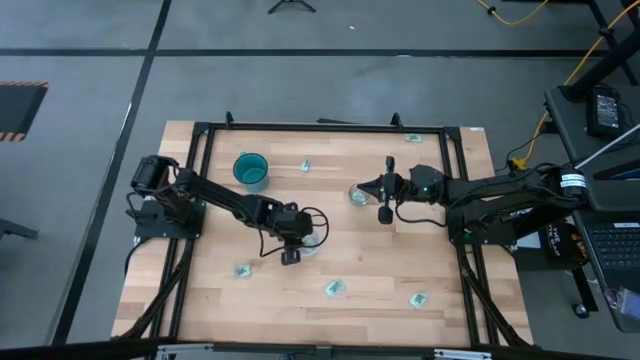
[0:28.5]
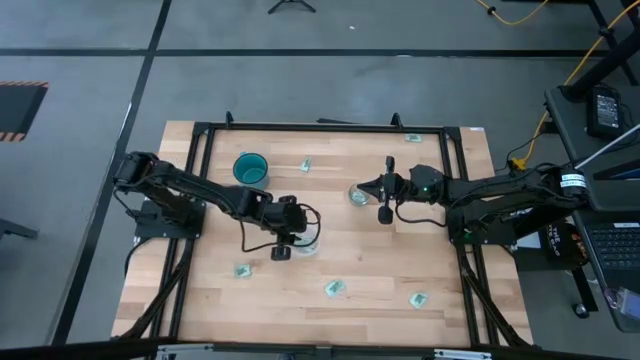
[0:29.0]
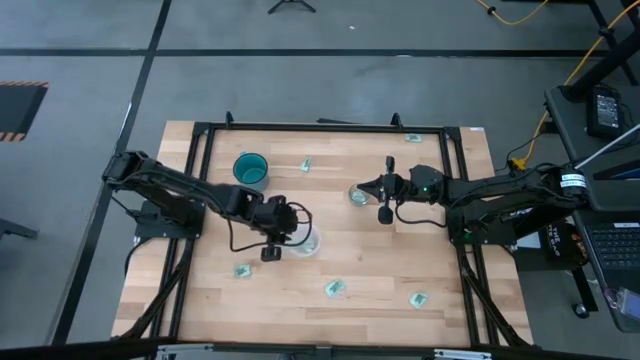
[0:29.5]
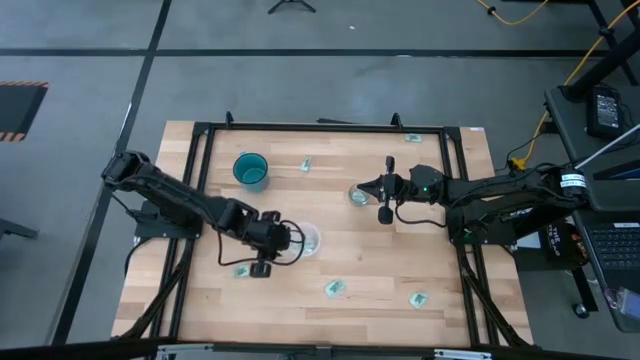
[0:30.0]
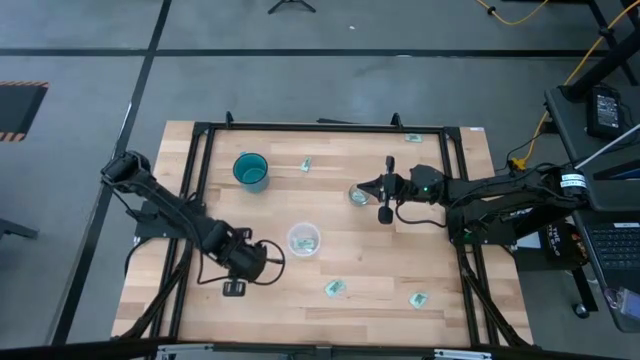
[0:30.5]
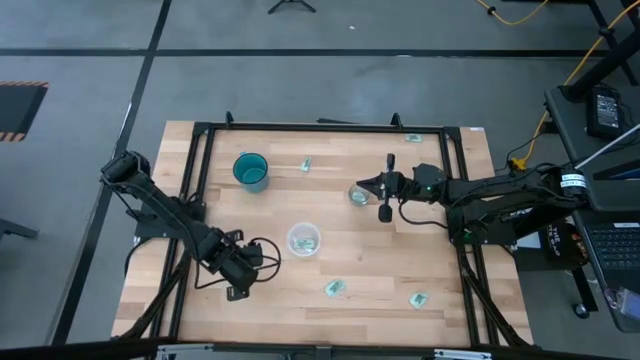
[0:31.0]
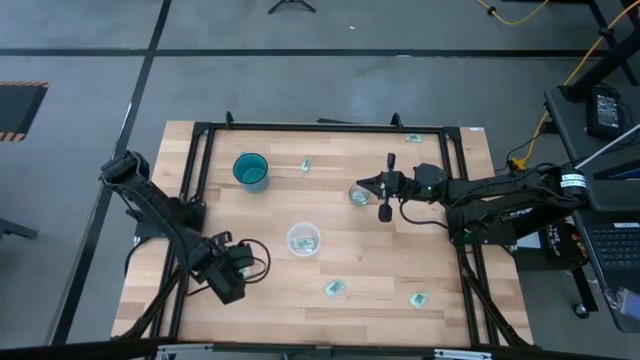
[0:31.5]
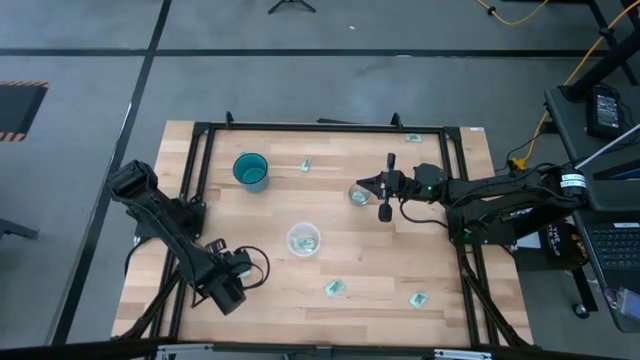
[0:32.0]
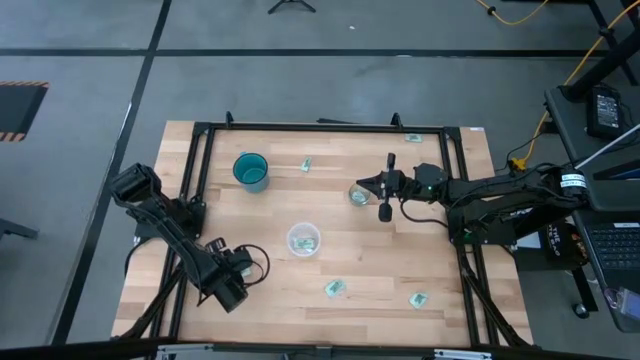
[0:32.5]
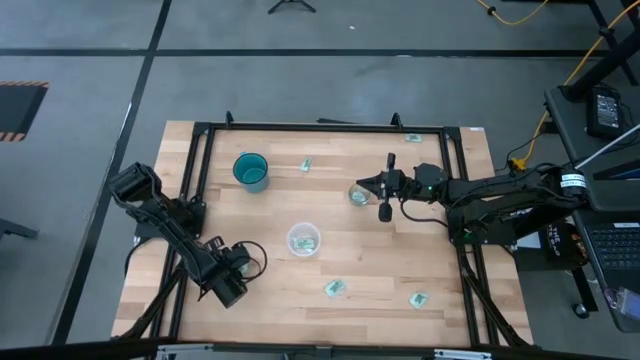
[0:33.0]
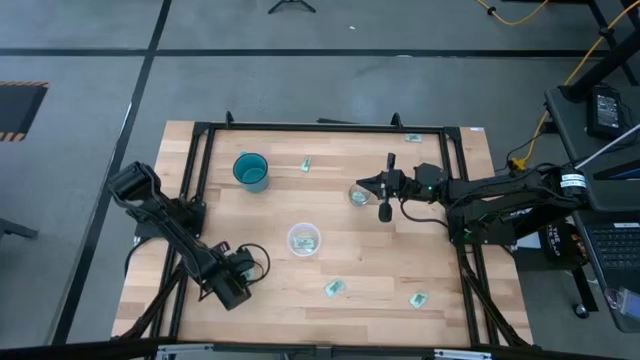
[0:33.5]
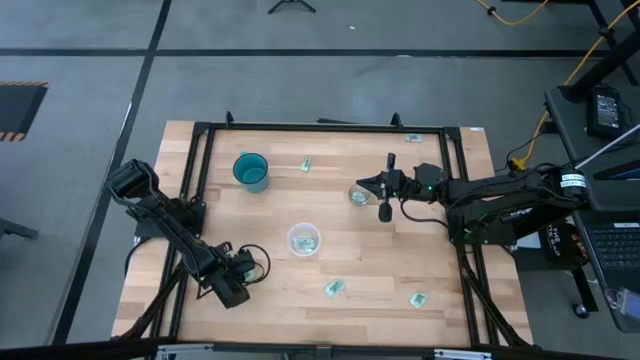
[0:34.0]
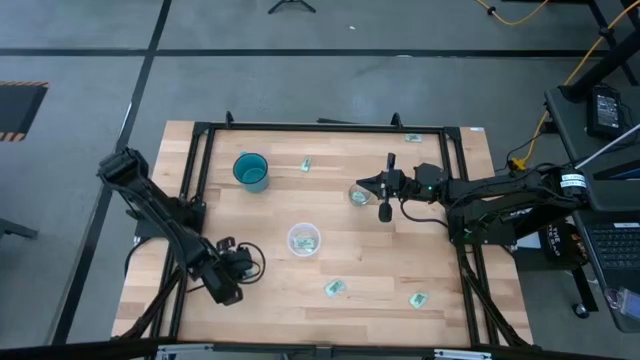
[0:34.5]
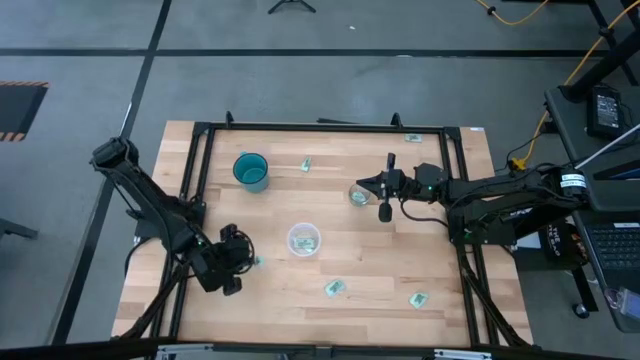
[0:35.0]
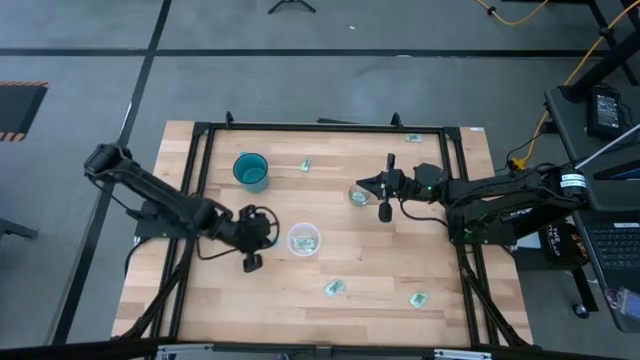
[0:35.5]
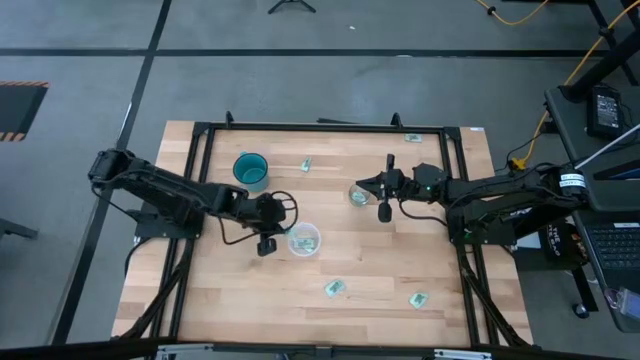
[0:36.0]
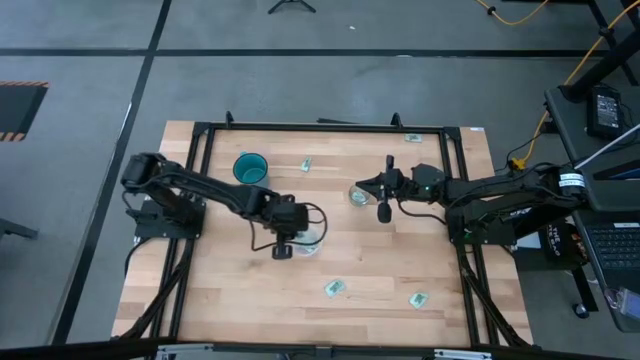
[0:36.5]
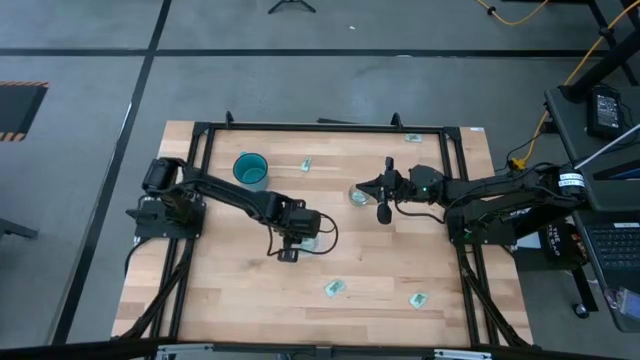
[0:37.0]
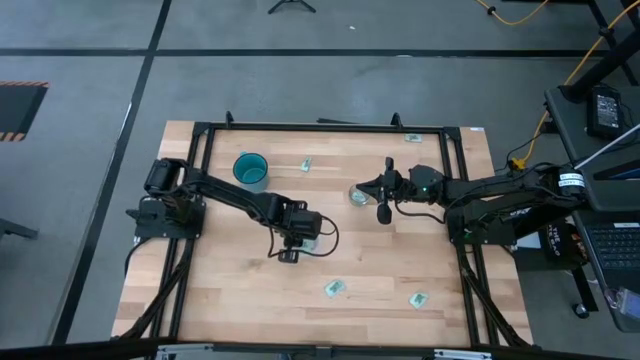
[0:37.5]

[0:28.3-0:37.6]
Task: Pick and place Stevia / Truvia into bins
Put the white stevia packet into the transparent plastic container

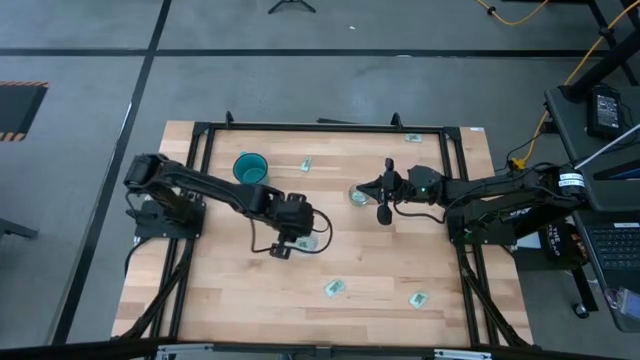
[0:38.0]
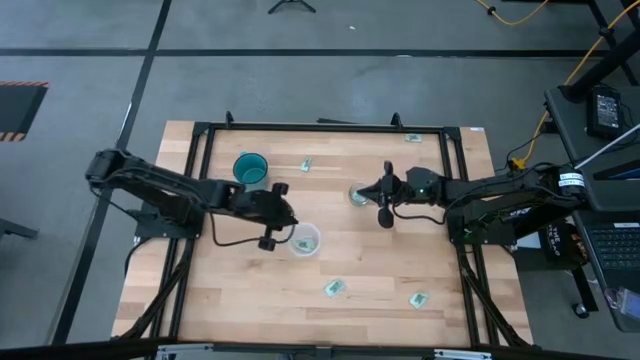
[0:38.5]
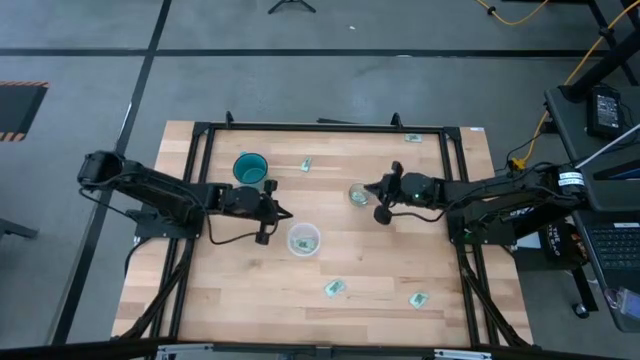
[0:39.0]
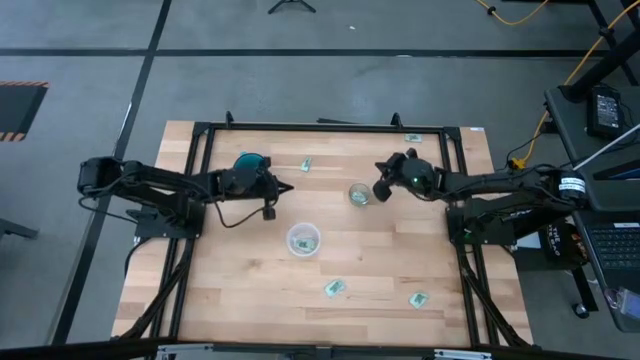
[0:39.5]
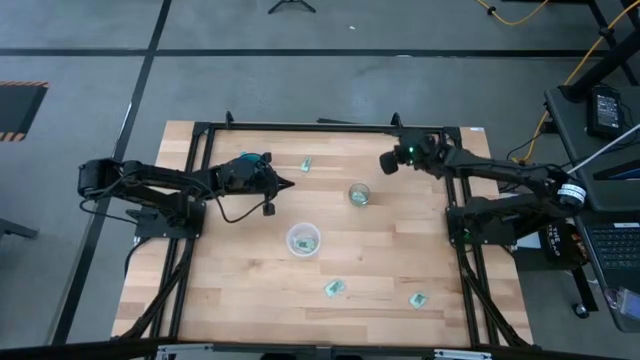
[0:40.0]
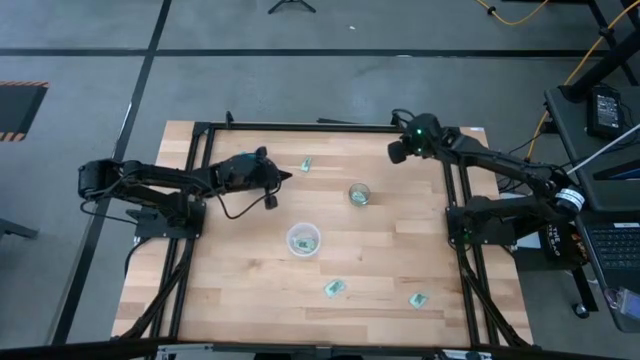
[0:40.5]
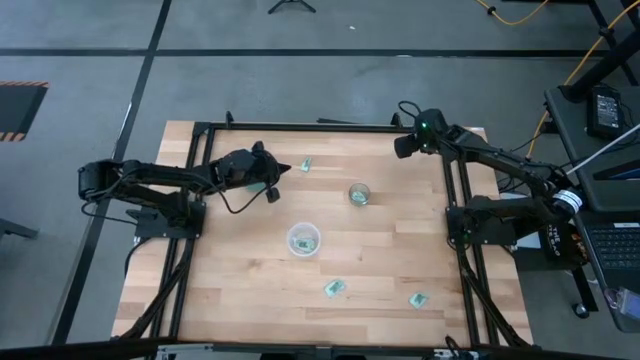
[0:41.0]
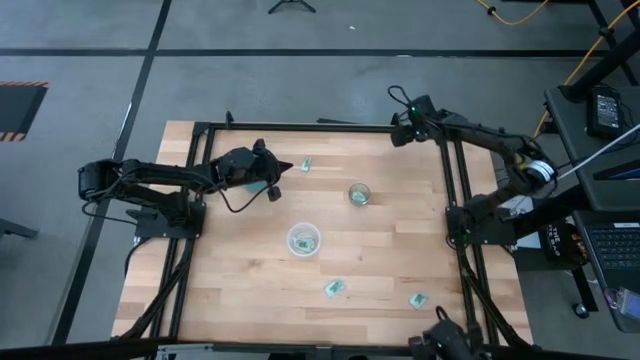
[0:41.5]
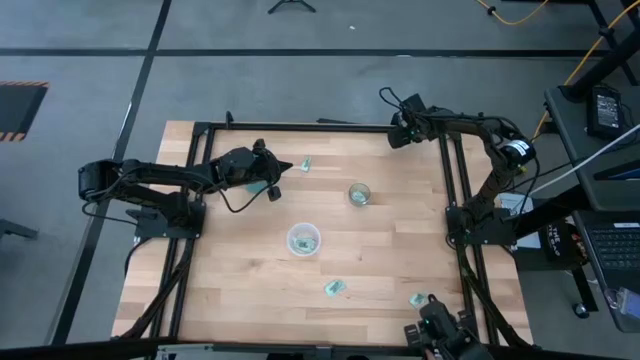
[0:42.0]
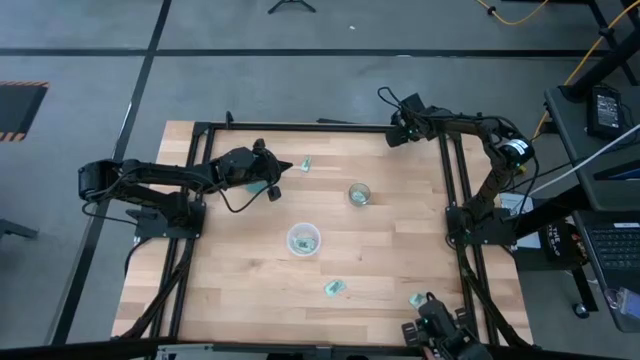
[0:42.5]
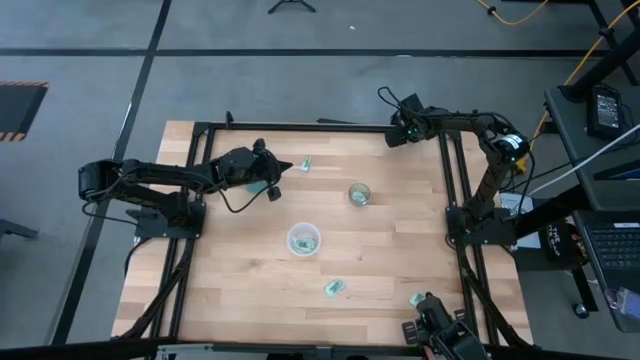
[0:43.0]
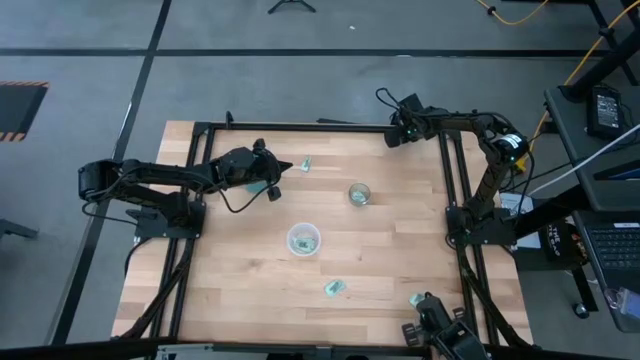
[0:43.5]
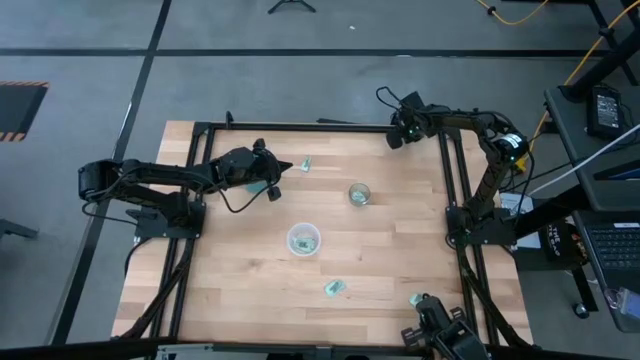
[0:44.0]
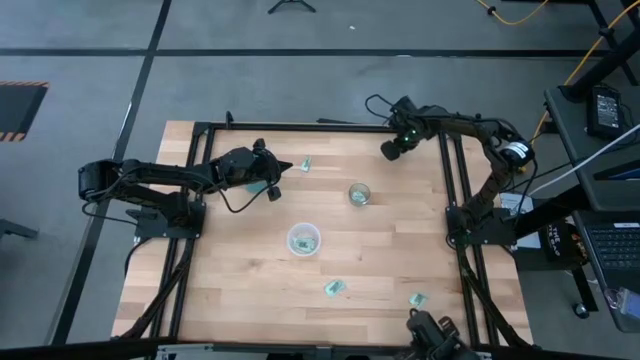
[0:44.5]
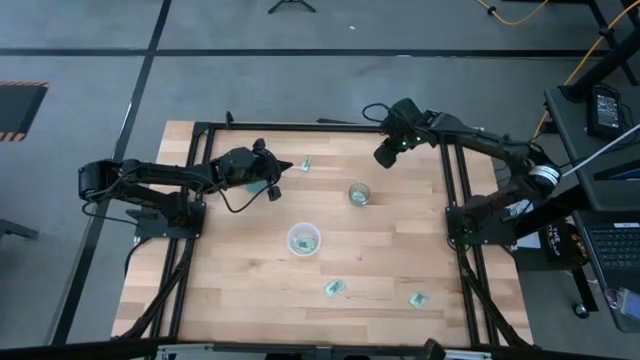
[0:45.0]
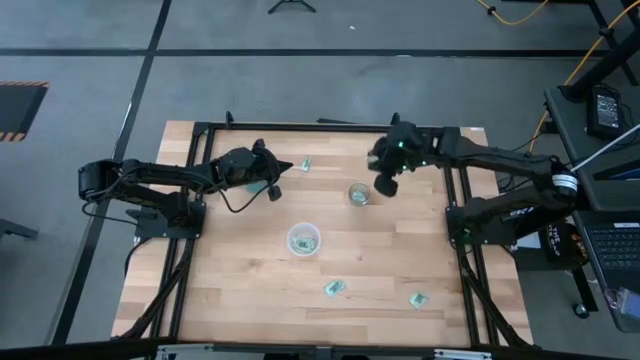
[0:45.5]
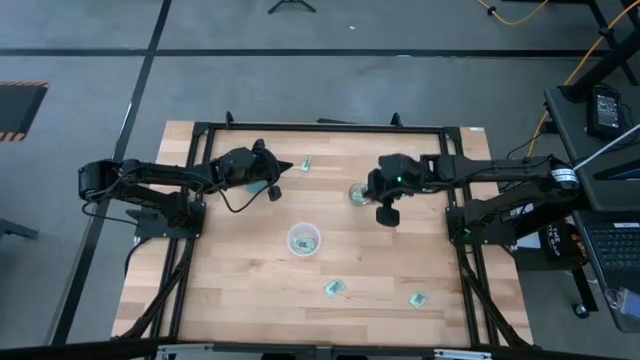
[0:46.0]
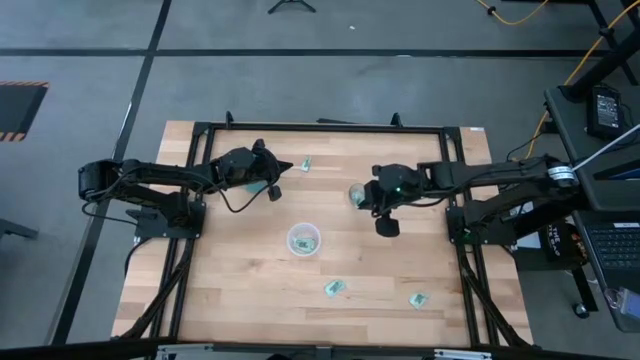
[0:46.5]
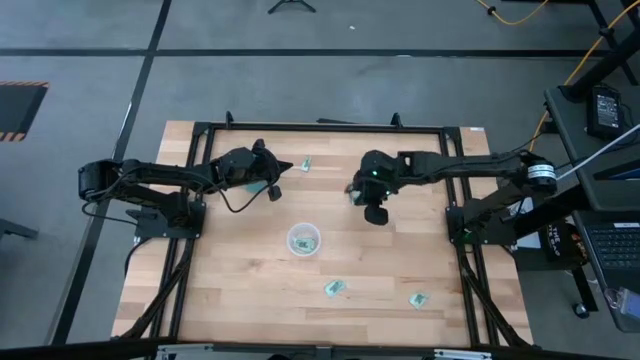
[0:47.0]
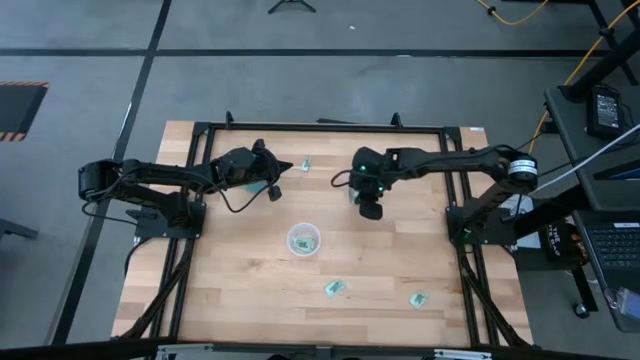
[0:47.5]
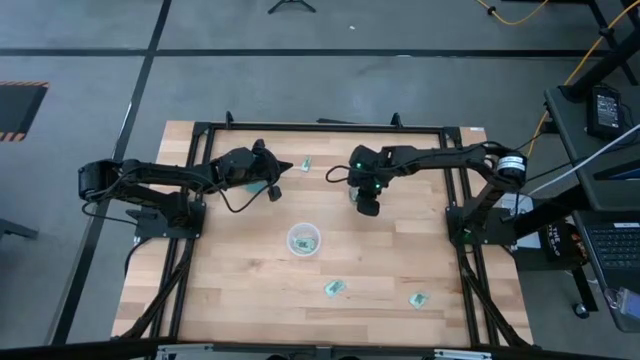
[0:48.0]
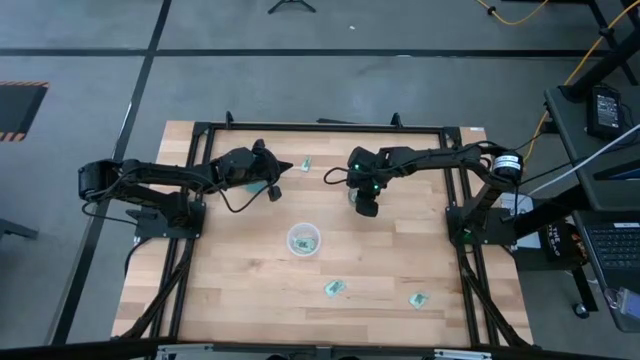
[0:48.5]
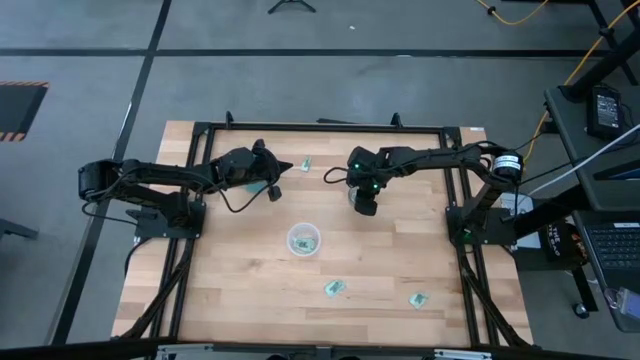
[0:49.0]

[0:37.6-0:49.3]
Put the white stevia packet into the transparent glass container

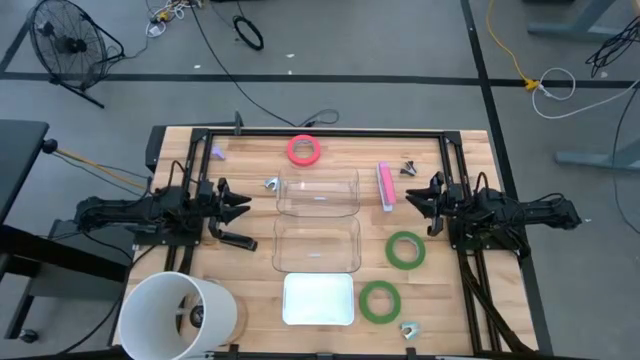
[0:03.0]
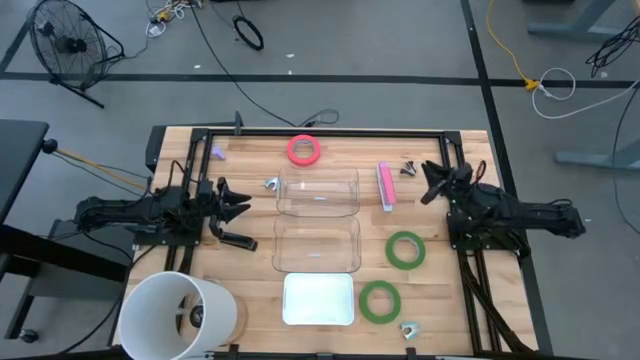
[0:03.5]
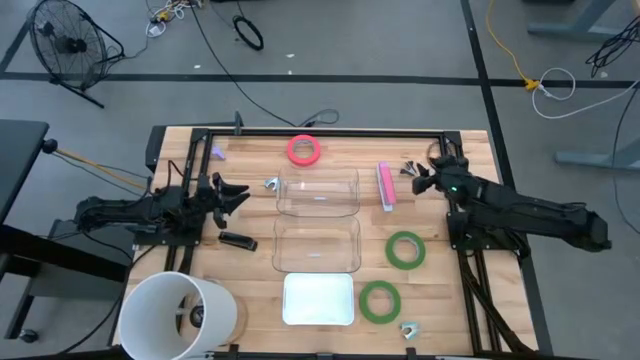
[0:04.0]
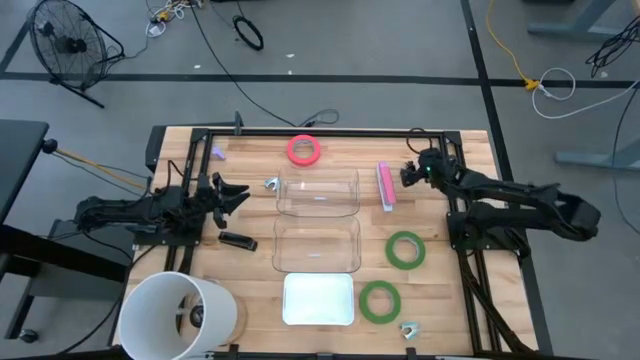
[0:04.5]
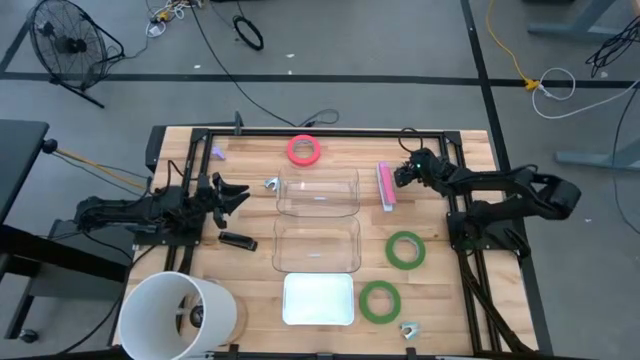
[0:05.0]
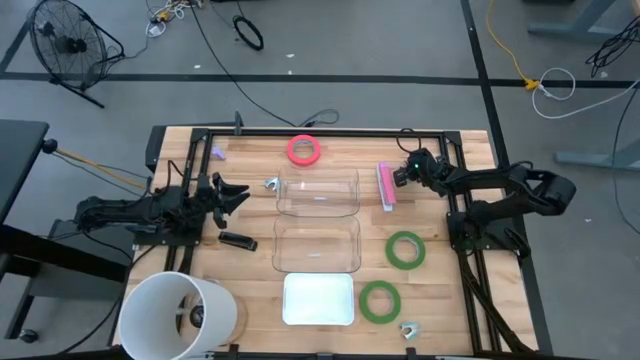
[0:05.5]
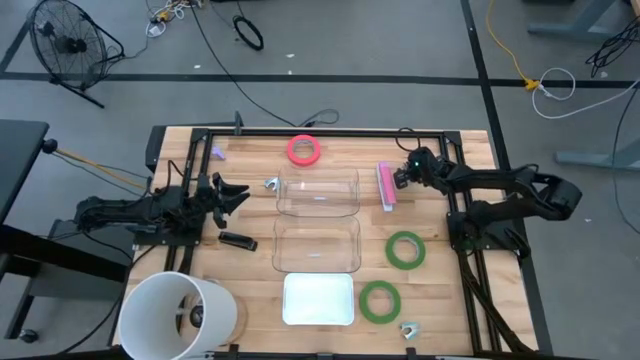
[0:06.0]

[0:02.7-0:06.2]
Task: Pick and place Stapler, Stapler remover, tape
Put the black staple remover into the white bin
